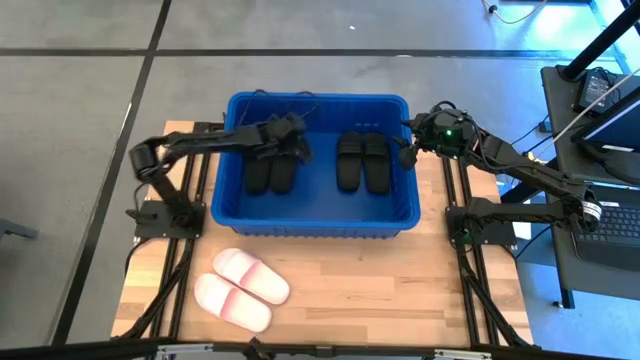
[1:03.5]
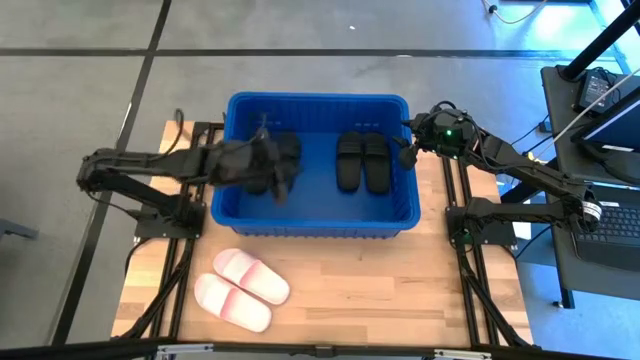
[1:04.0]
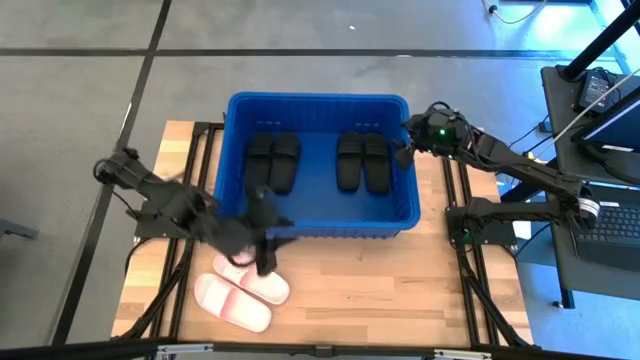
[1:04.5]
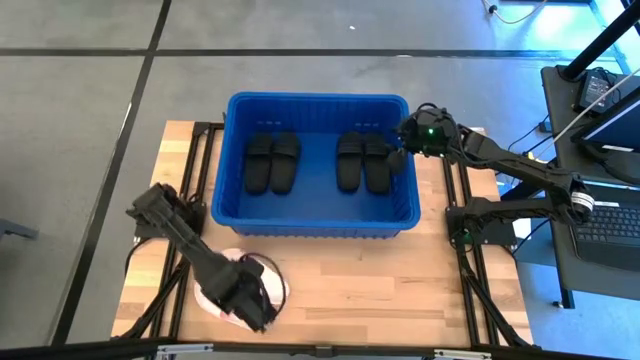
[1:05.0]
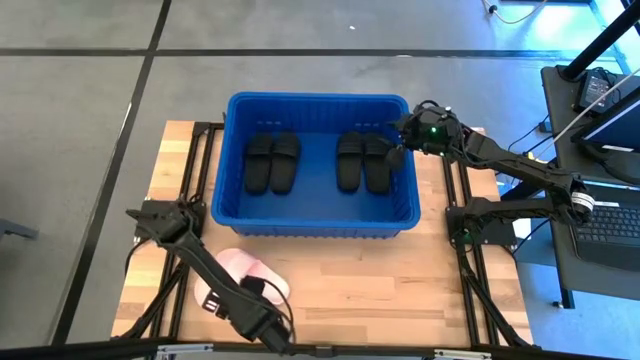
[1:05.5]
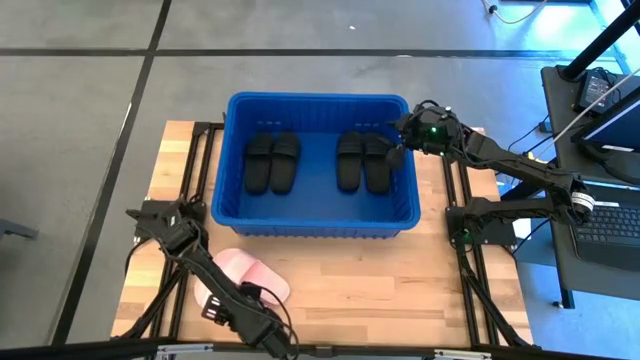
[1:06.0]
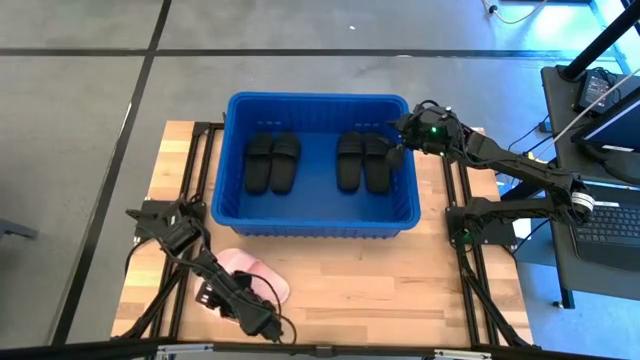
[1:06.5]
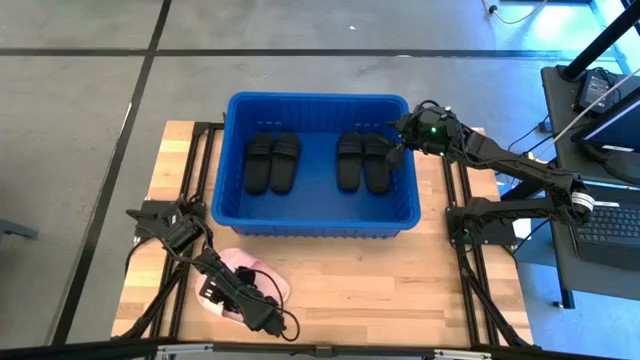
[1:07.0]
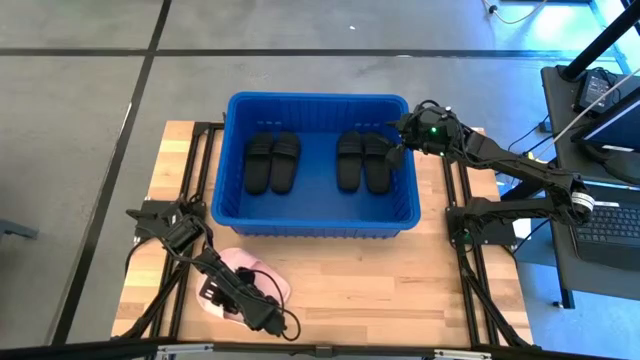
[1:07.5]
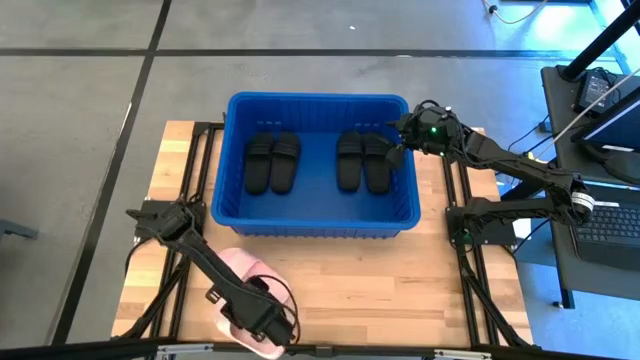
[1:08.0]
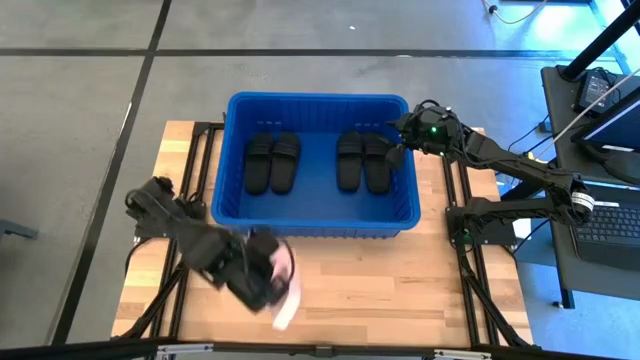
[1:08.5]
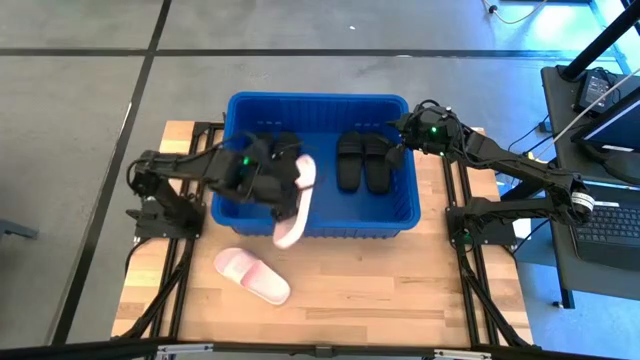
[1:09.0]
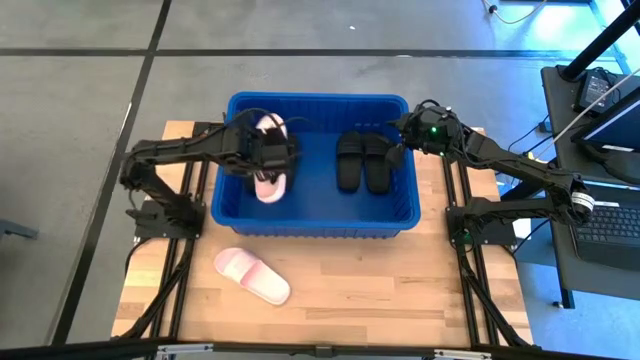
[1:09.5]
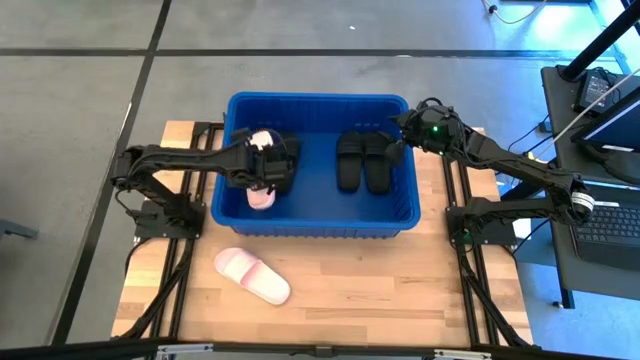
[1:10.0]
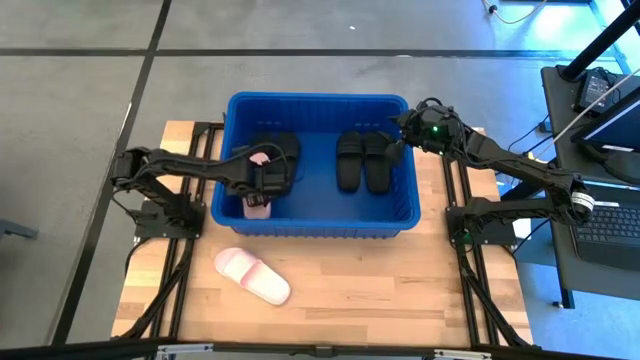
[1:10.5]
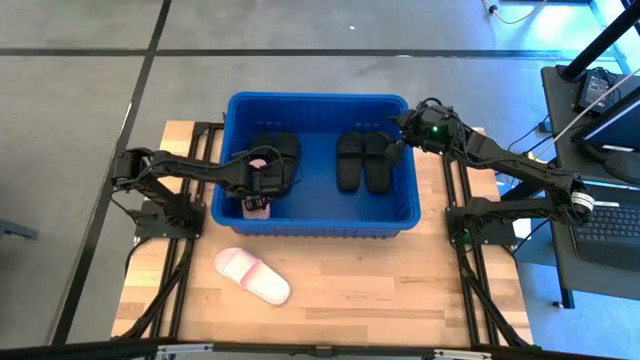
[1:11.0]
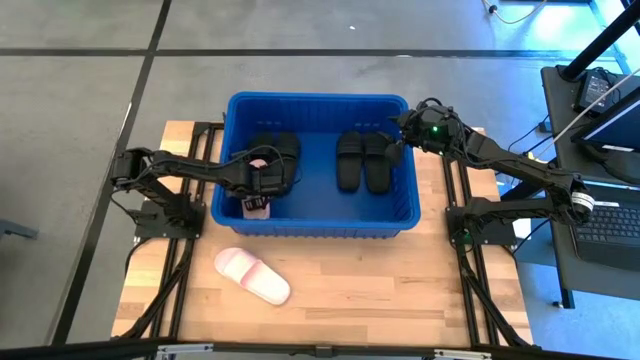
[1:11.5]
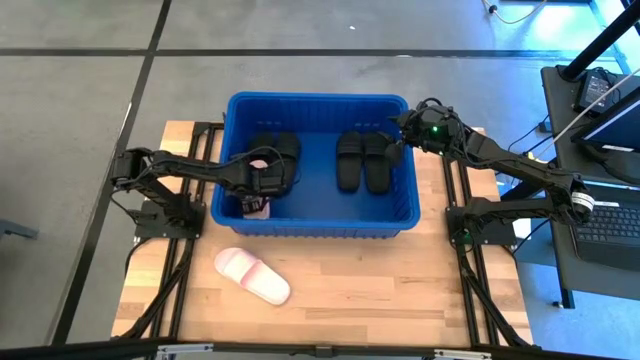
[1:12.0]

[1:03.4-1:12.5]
Task: Pick and place slides into bin
Put the pink slide into the organizer bin

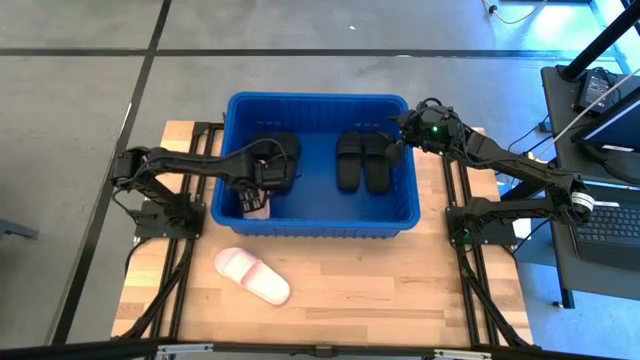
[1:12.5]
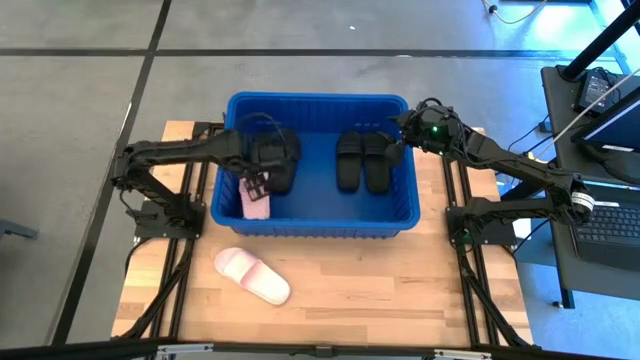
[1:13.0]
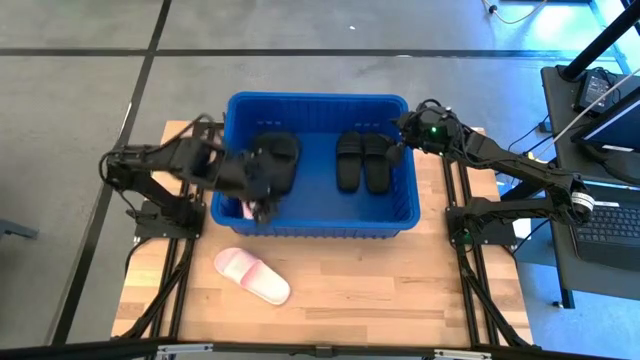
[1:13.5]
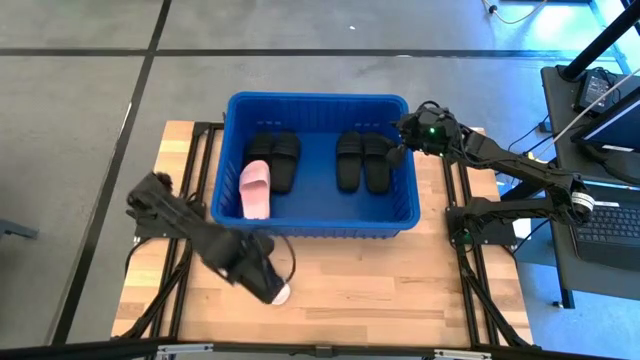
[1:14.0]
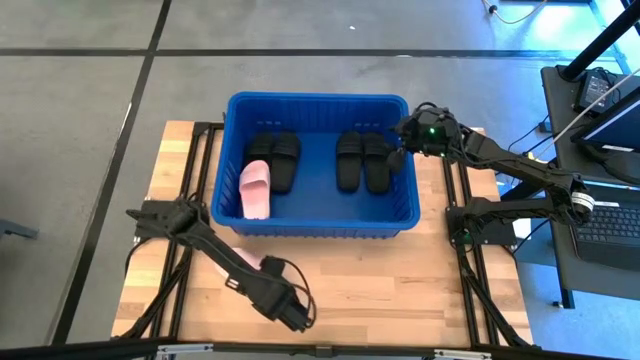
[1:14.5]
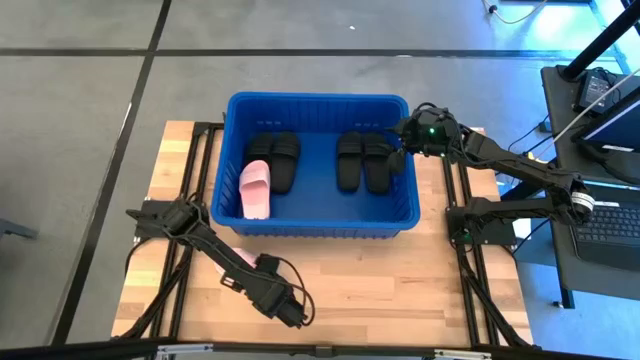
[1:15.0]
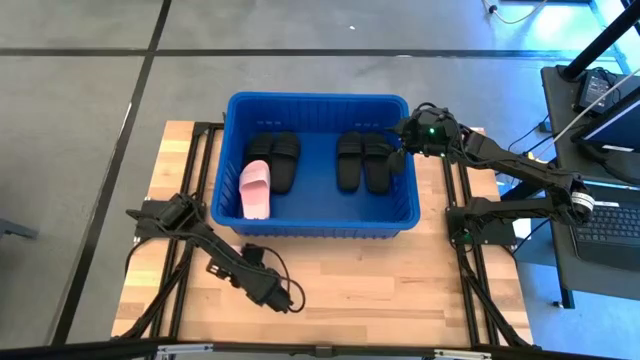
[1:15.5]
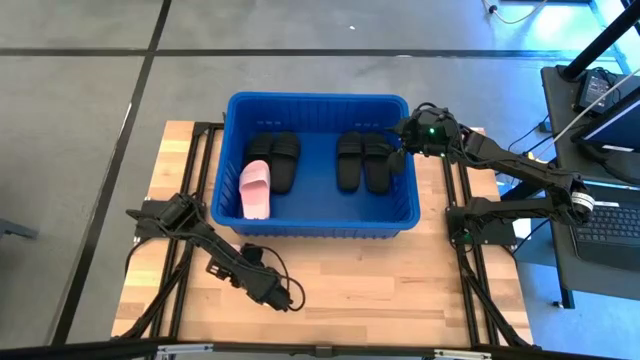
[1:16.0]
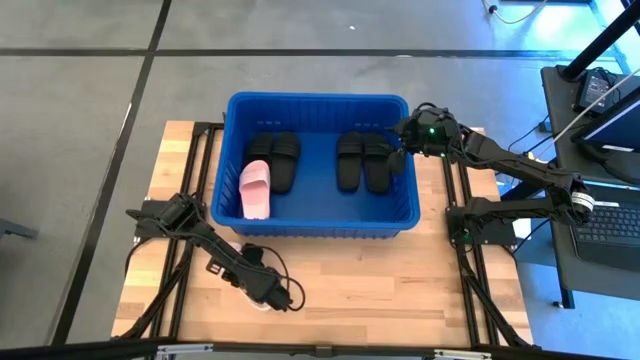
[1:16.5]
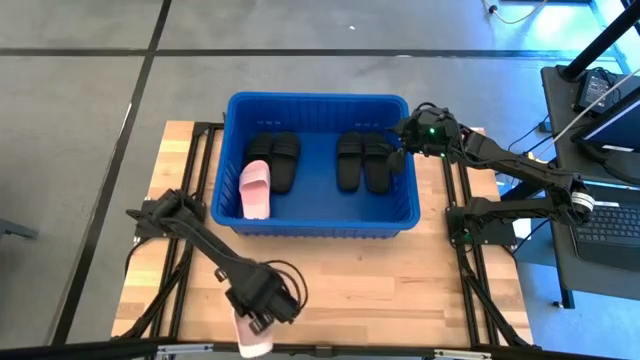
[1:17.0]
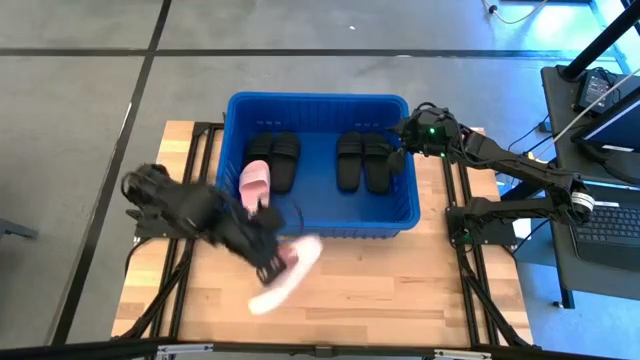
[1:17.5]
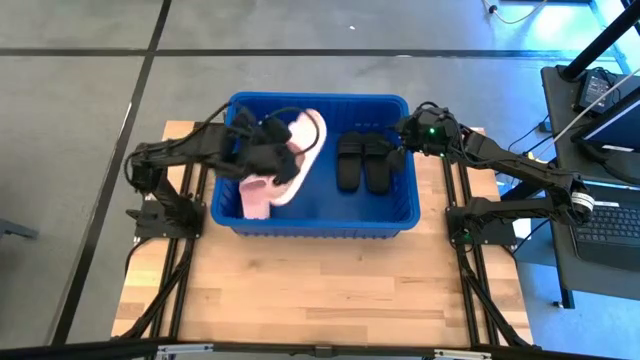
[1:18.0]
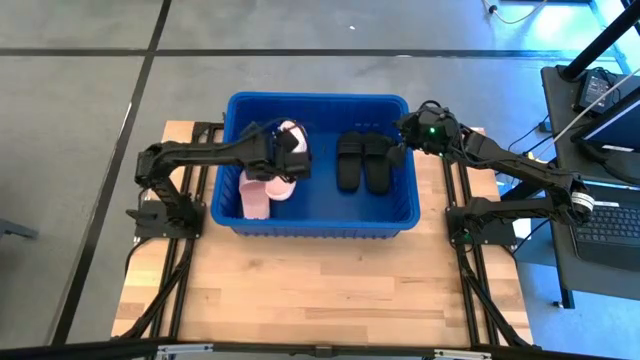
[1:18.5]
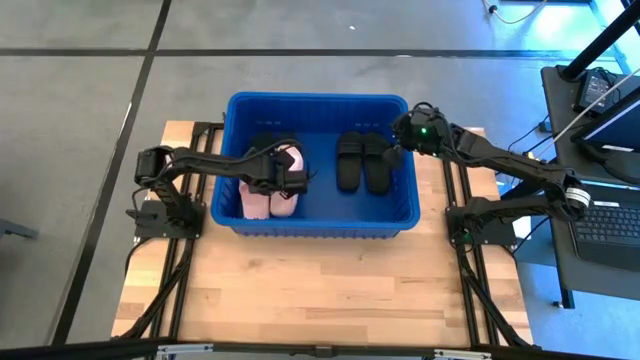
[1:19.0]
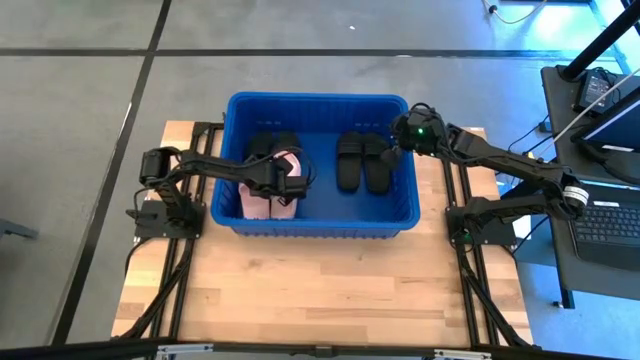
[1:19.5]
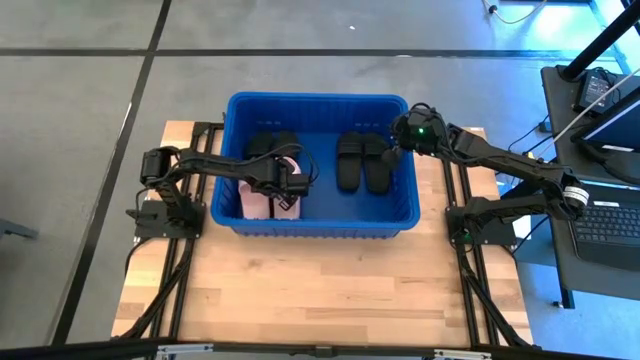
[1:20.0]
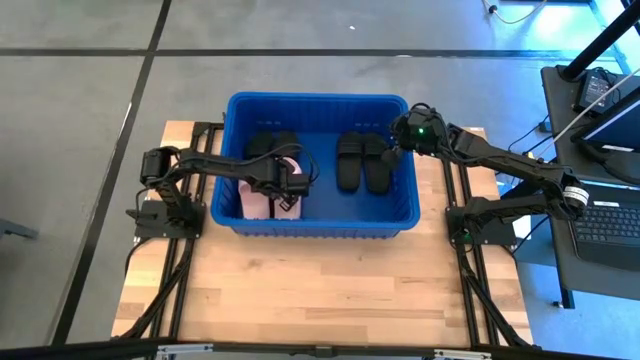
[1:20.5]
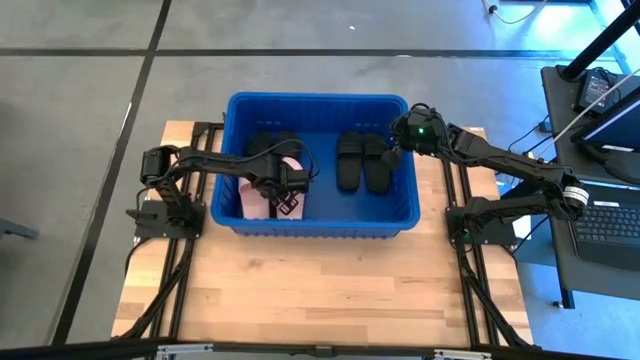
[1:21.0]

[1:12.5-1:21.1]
Put the pink slide into the organizer bin

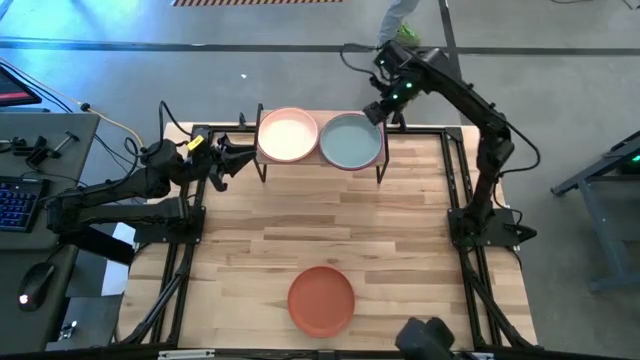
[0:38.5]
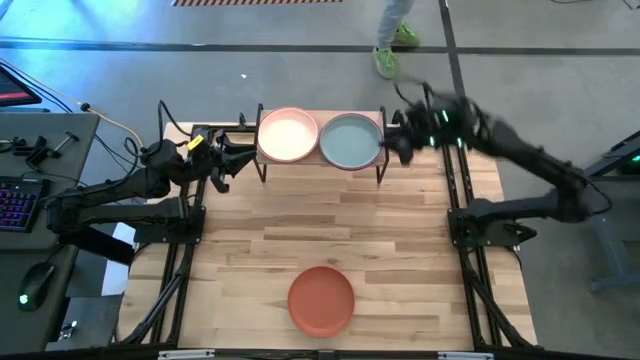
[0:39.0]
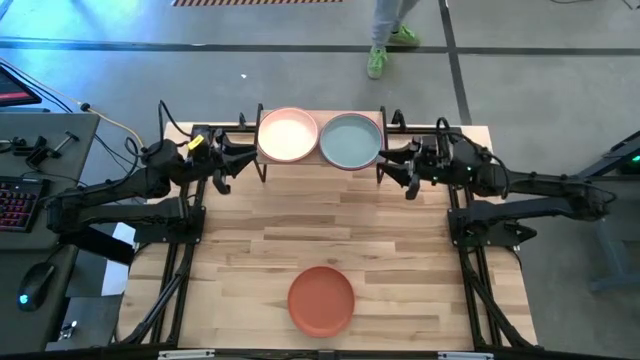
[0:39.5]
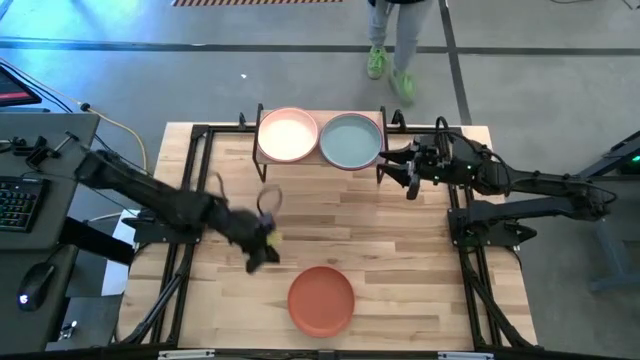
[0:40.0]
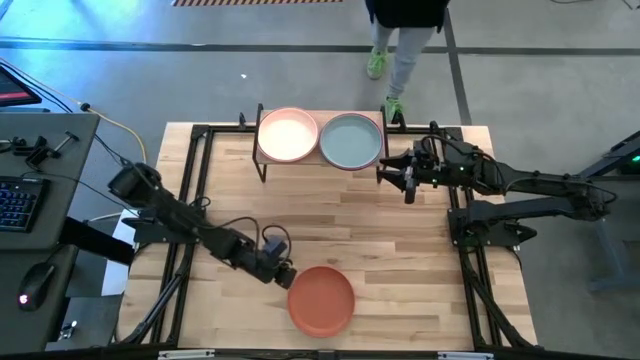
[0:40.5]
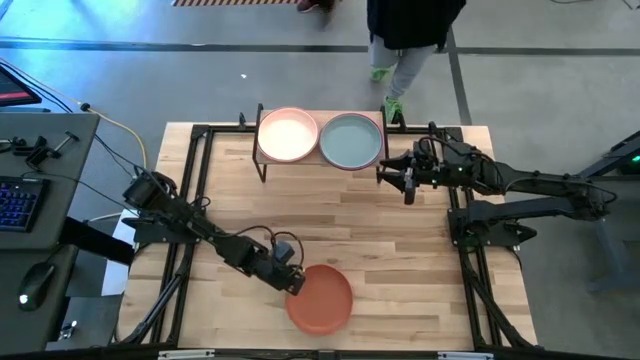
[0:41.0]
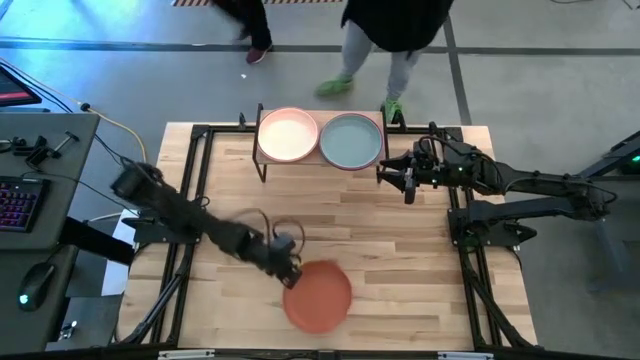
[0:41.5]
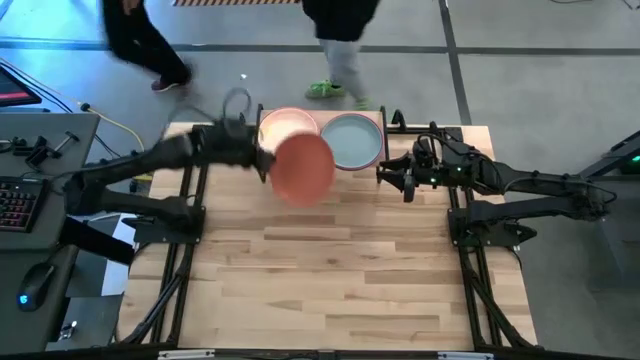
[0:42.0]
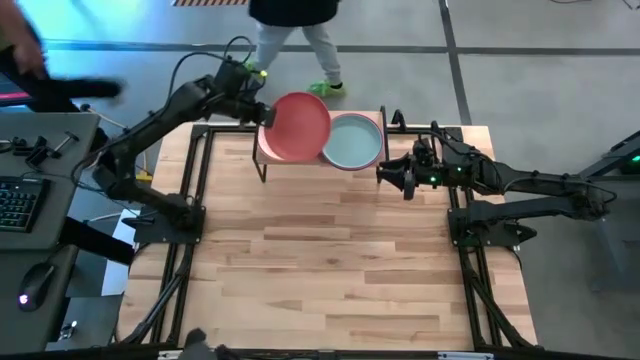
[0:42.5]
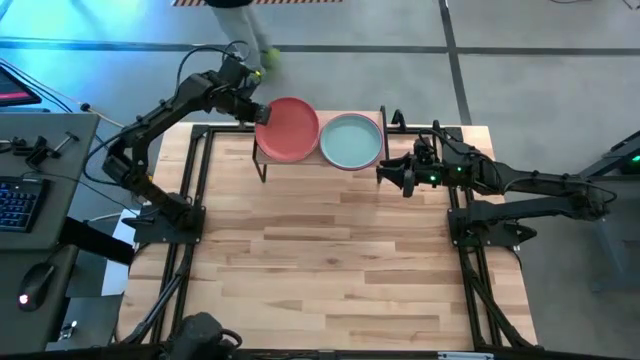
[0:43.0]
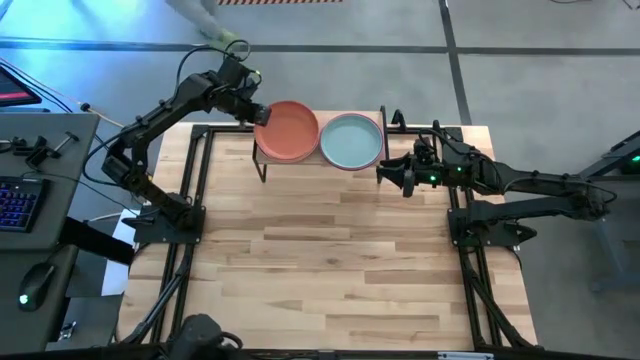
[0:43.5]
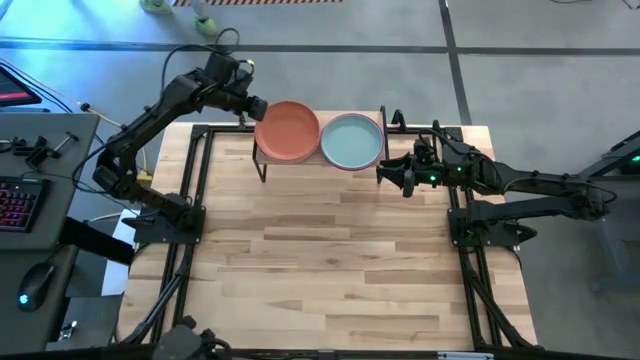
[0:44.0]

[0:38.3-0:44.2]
Task: Place and stack plates onto a shelf
Stack the orange plate on top of the white on the shelf
